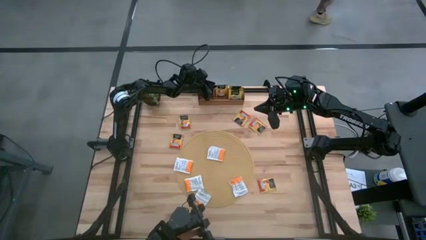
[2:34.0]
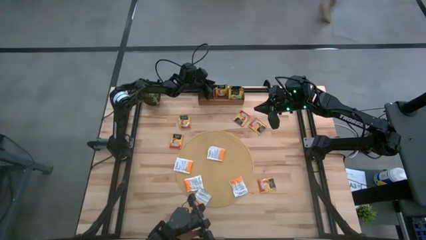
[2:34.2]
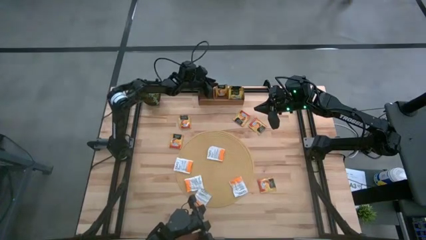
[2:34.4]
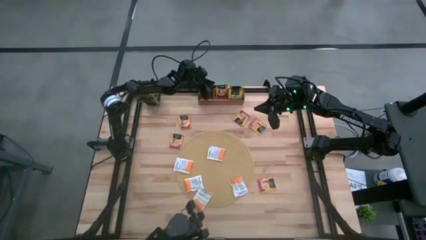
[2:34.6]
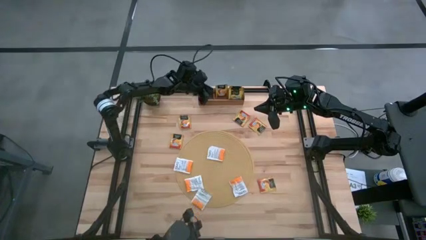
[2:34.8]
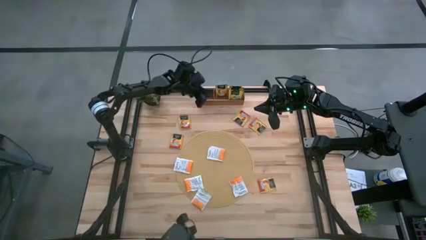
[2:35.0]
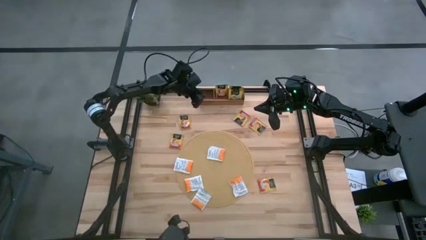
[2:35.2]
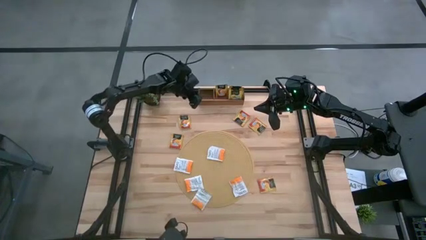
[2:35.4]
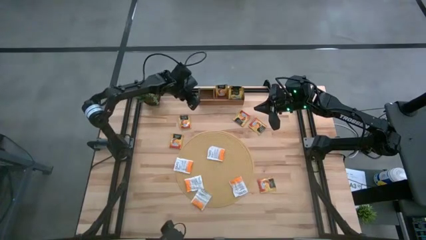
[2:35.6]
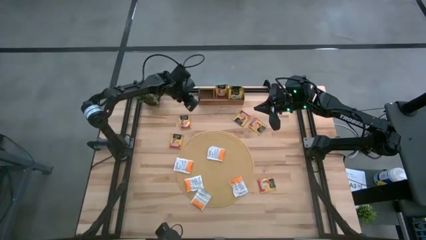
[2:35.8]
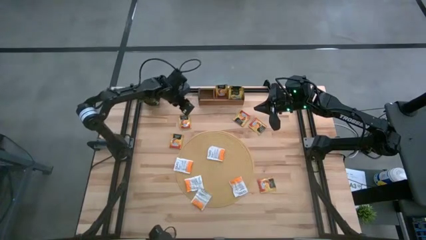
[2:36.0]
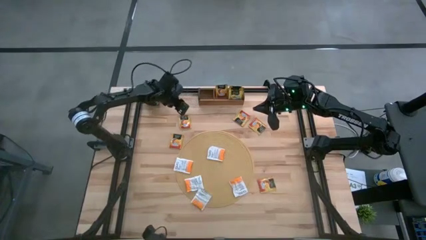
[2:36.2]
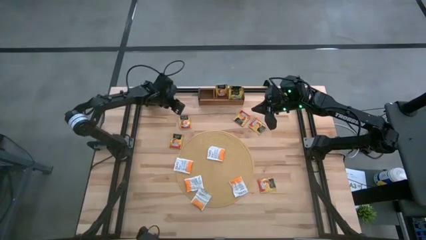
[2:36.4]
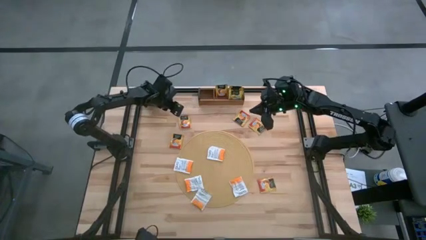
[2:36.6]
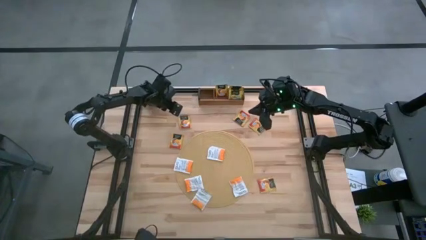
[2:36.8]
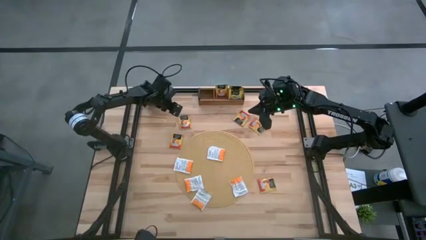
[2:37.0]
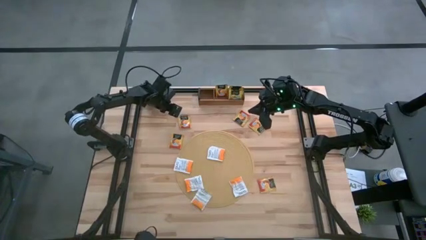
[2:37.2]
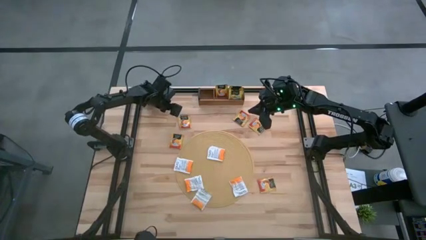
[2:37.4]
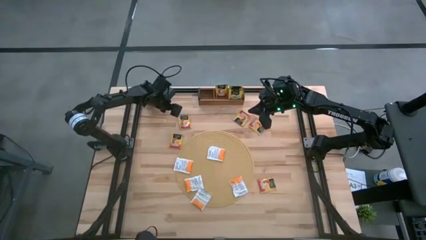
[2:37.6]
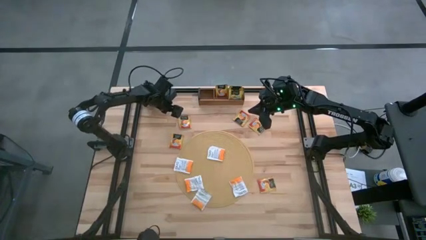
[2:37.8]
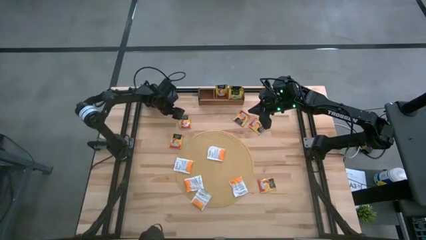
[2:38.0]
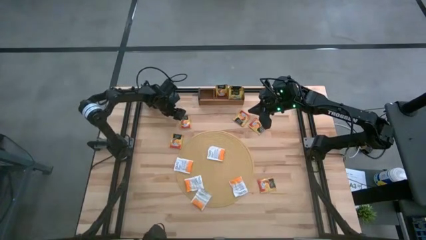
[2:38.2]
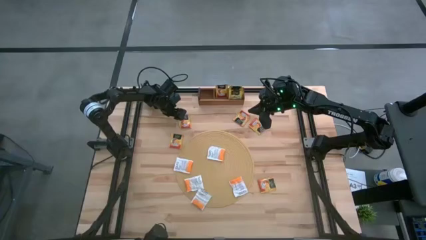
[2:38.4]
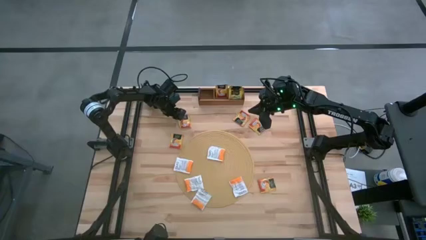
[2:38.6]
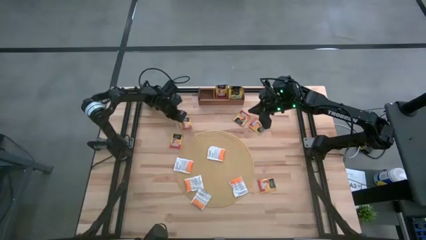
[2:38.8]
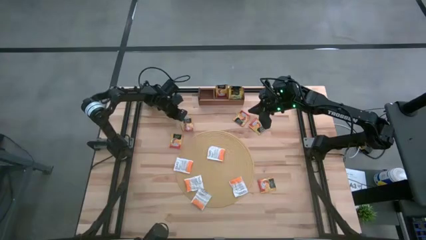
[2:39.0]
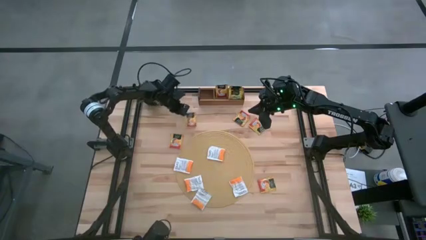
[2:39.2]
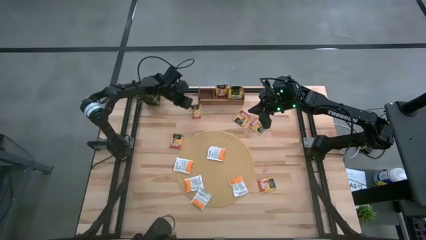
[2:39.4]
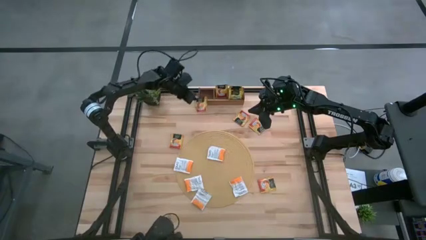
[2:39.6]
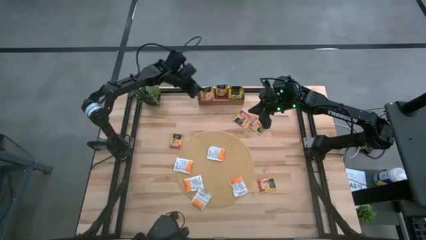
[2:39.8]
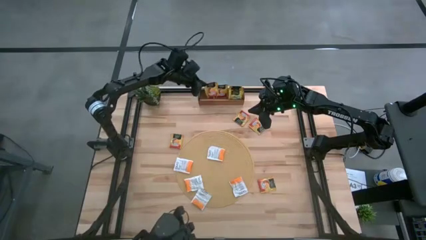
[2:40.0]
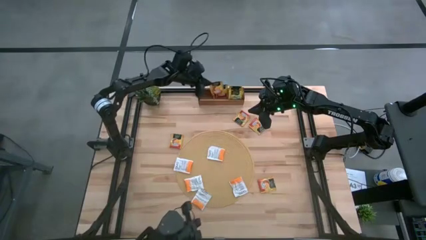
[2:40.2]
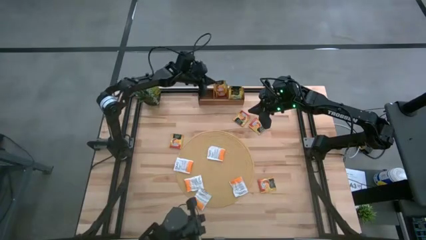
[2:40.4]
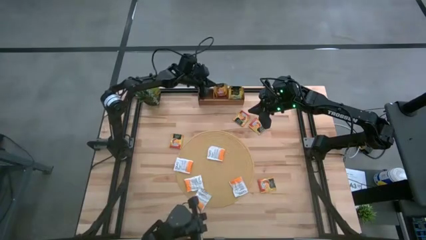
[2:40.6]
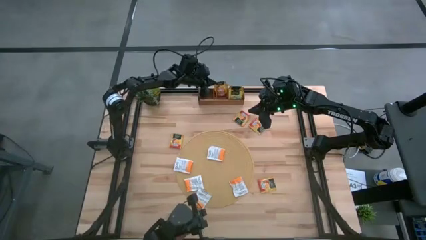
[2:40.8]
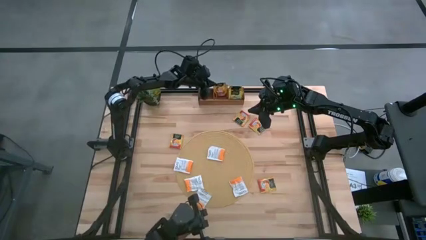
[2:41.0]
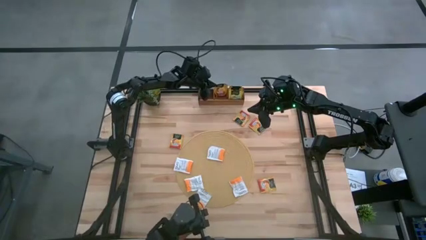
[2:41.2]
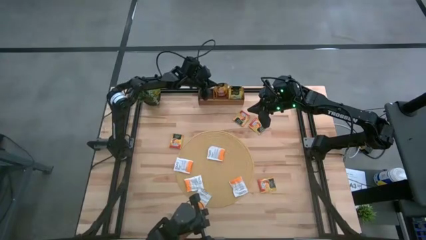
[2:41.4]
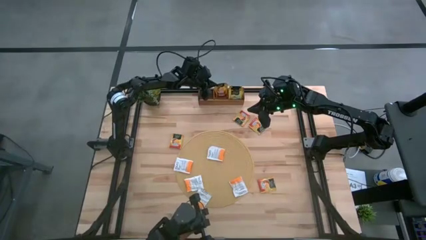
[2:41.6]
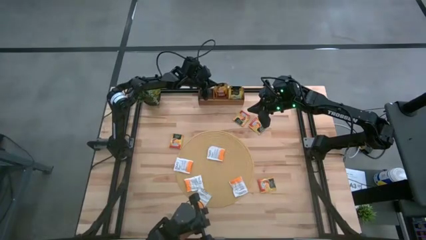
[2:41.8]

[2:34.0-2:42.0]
Task: Pick & Place Tea
Put the red tea bag into the middle section of the wooden organizer

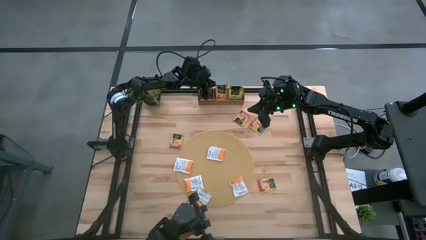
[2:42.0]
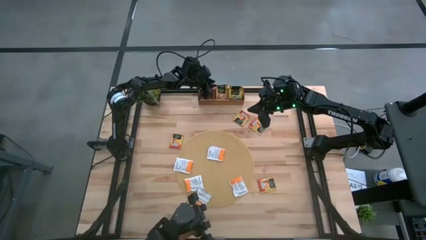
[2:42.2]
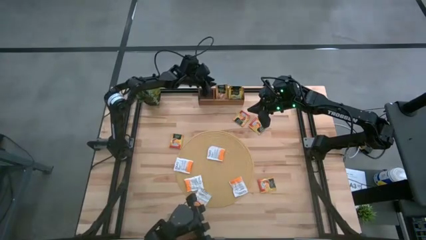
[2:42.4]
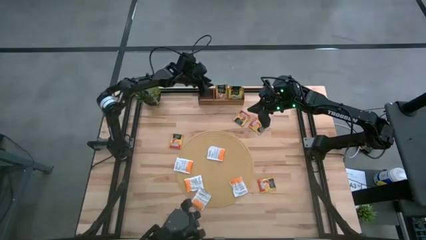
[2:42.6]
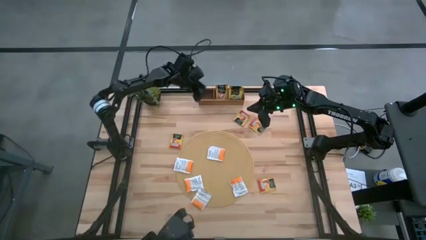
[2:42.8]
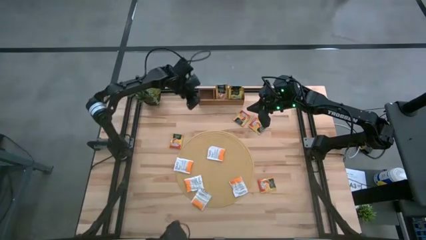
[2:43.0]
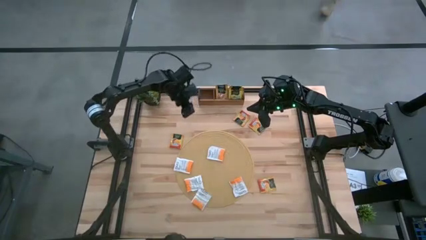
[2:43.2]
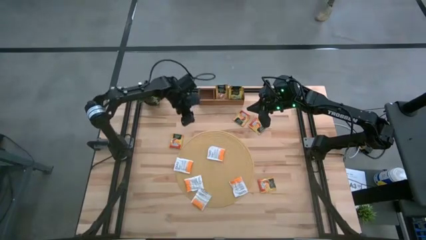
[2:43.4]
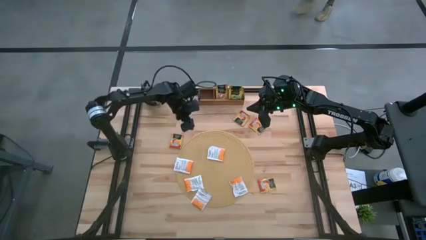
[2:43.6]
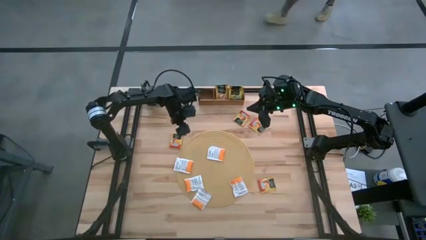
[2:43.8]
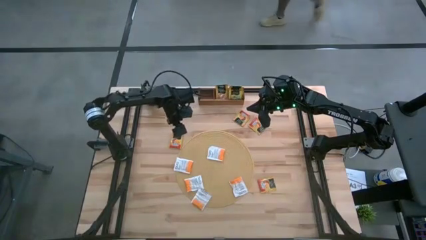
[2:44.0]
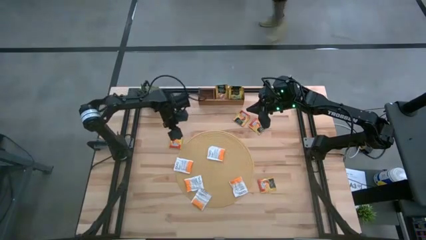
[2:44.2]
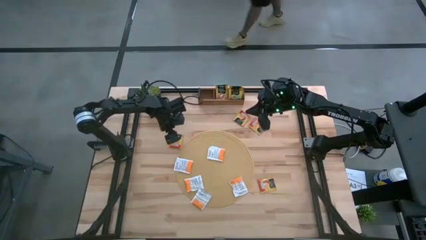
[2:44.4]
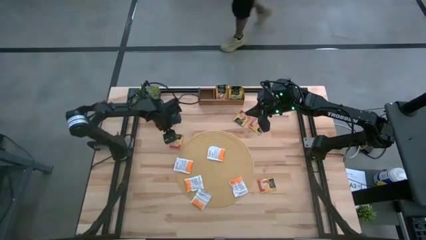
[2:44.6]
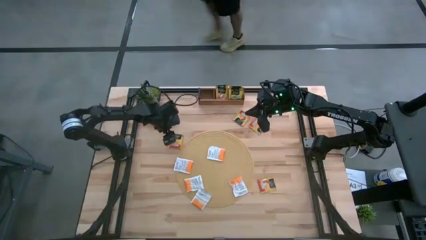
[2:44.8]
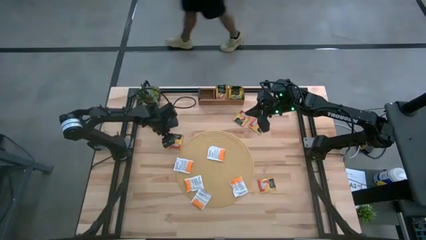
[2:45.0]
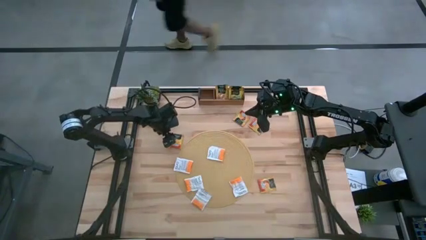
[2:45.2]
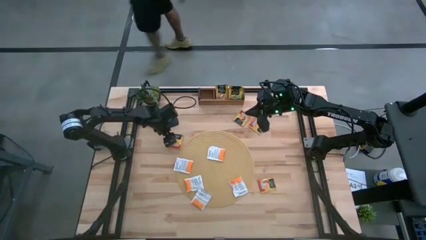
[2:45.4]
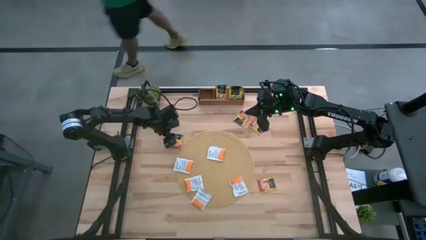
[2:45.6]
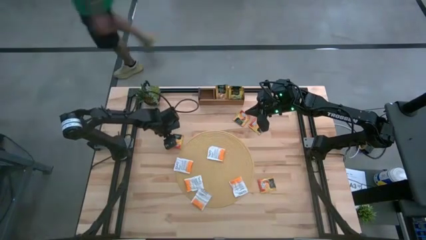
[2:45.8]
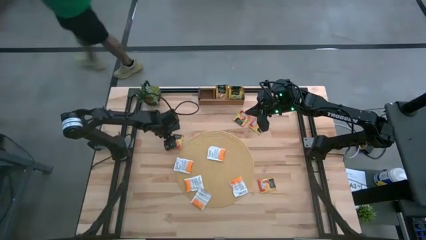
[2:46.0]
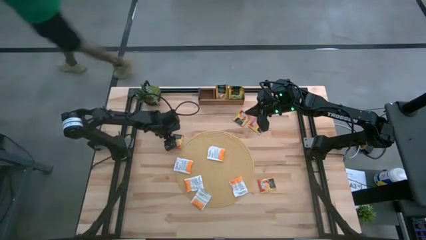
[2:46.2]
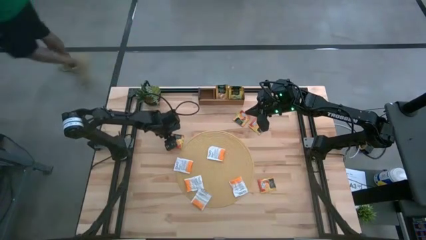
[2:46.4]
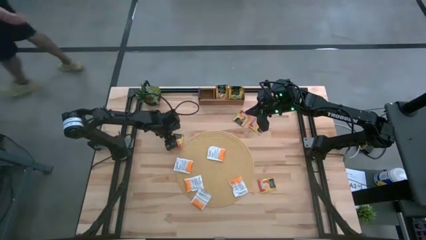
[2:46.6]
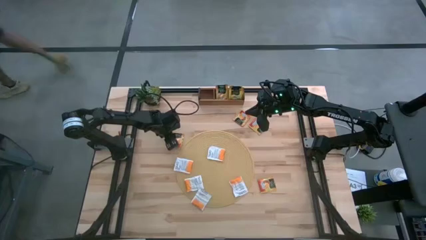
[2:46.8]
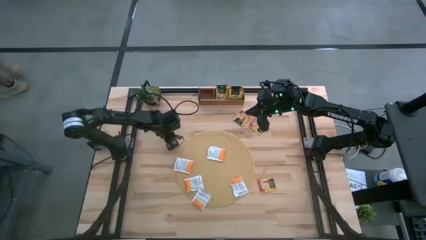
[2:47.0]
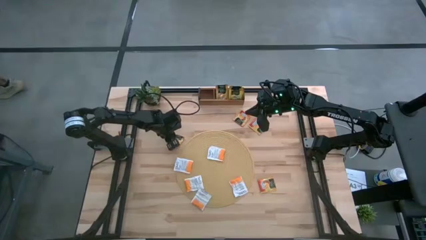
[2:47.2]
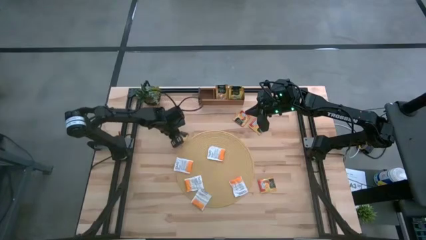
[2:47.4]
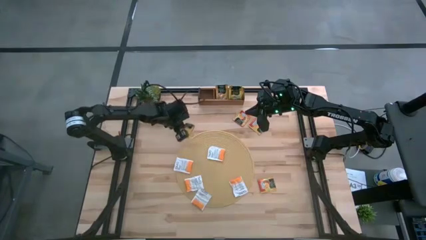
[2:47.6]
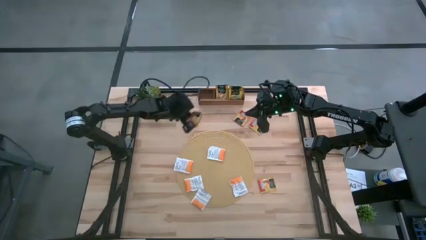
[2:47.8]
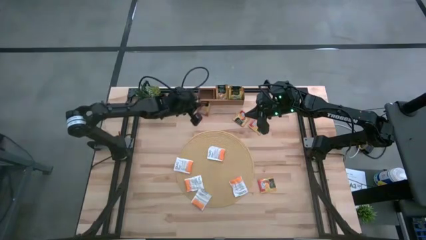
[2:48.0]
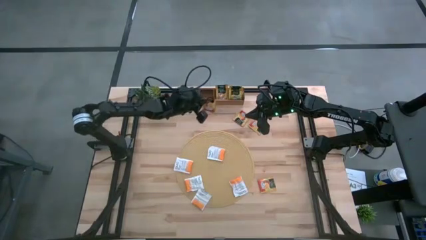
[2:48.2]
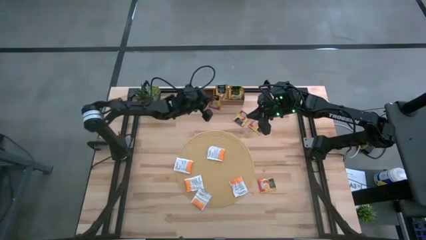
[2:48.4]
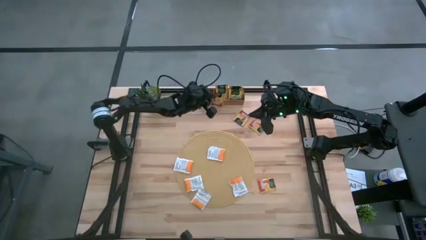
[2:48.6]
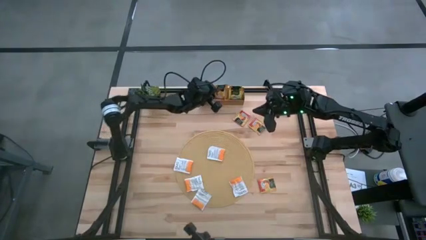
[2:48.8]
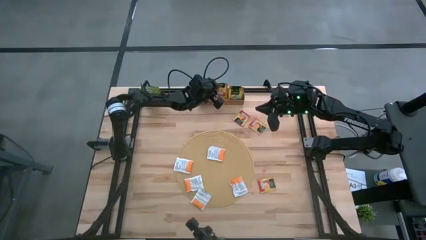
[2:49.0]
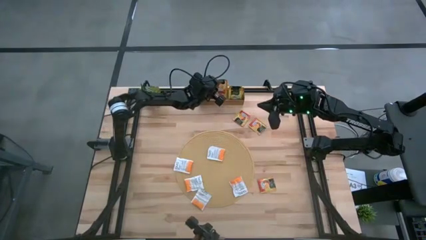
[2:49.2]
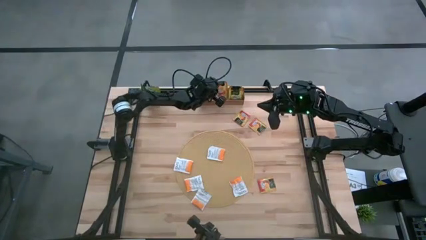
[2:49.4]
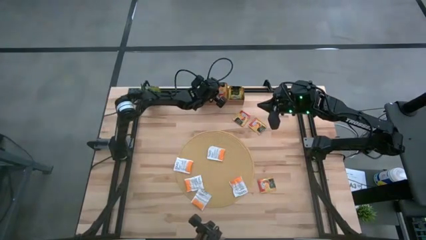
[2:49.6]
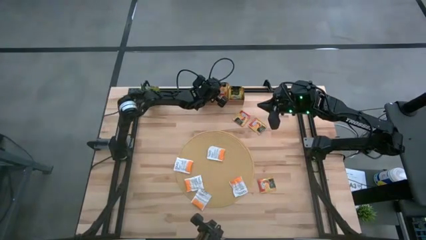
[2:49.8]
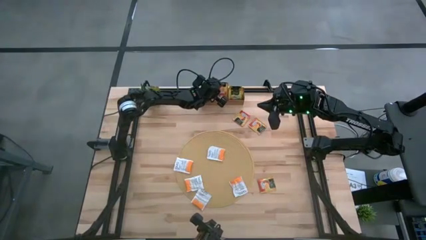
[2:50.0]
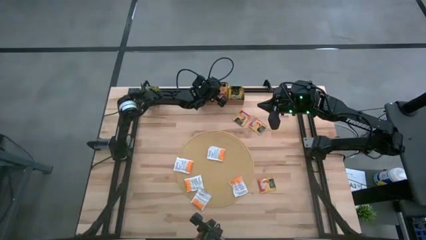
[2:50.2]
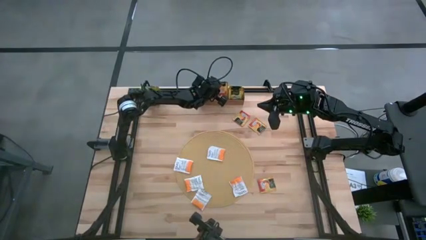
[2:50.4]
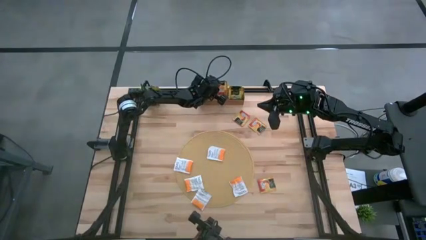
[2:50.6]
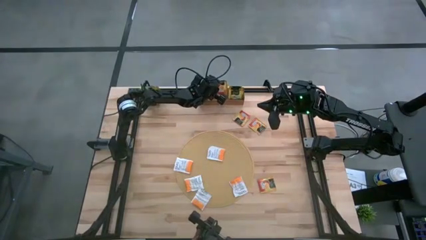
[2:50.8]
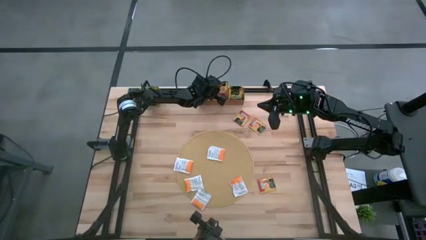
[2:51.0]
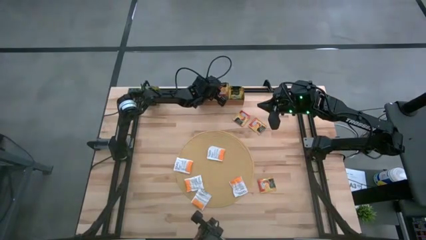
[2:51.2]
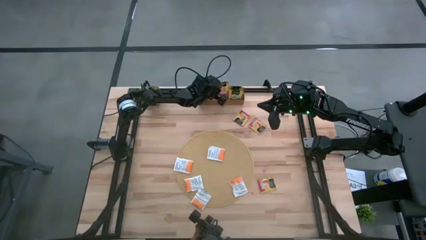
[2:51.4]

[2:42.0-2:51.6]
Put the red tea bag into the middle section of the wooden organizer
